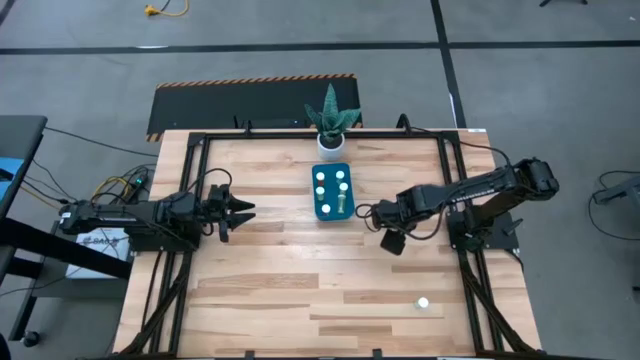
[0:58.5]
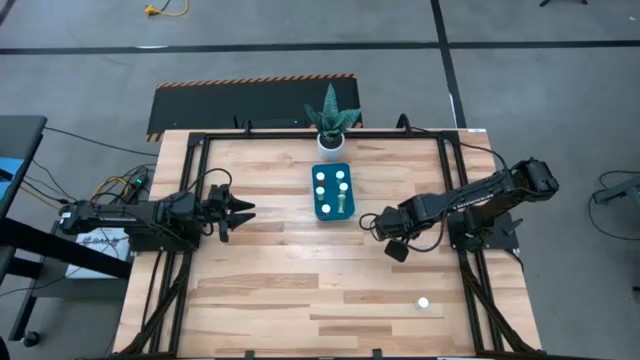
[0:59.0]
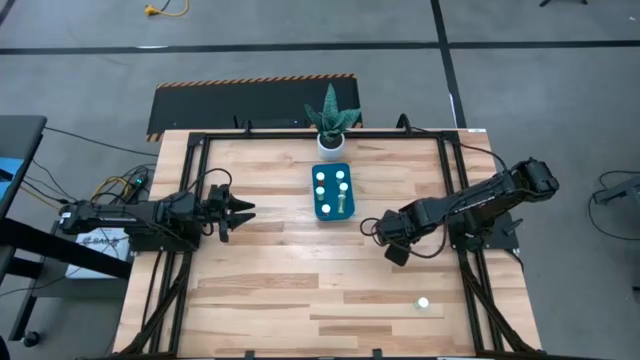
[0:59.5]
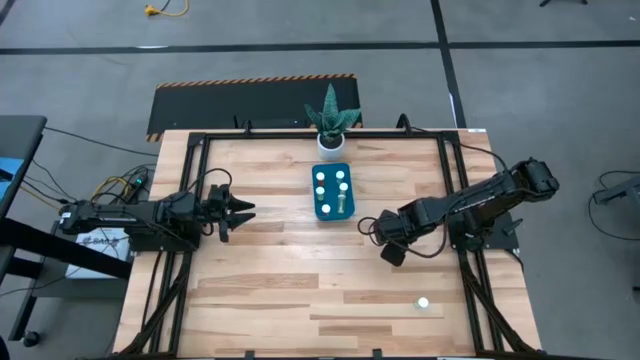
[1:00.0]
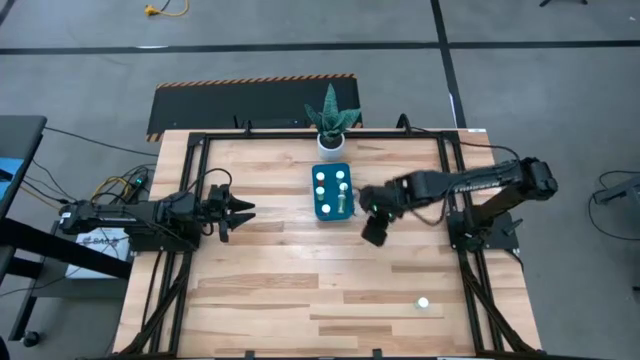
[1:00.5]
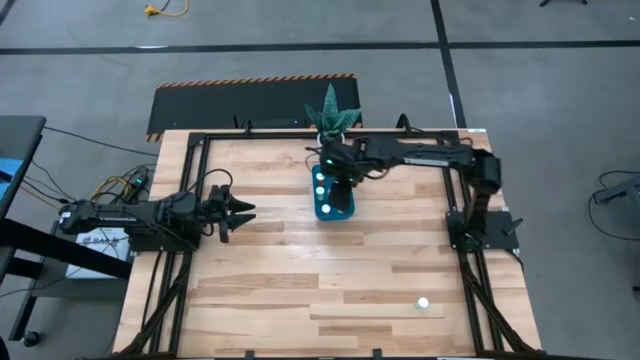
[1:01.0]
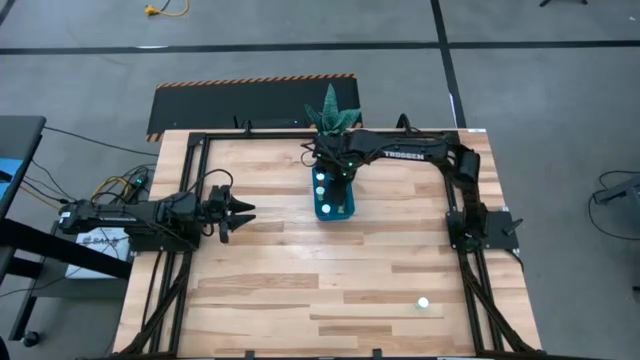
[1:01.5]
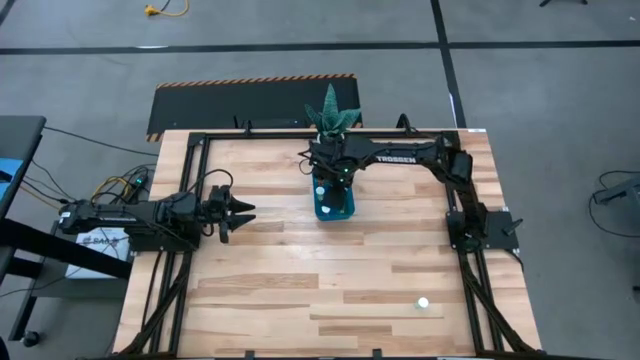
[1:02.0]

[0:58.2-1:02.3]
Task: Pick and place pill bottles into a basket
Put the yellow pill bottle into the blue container

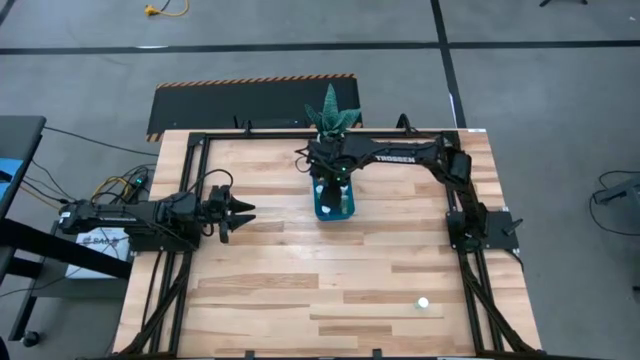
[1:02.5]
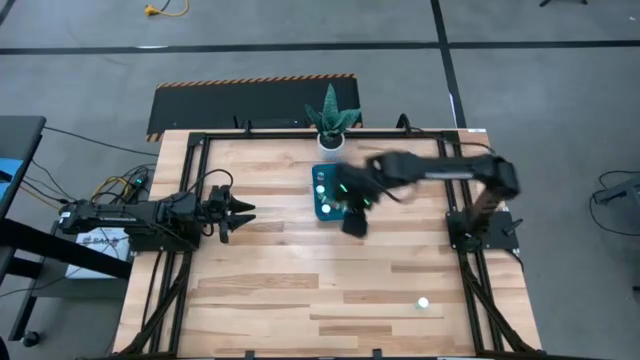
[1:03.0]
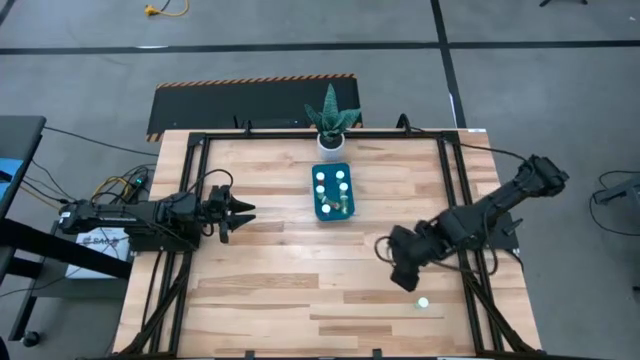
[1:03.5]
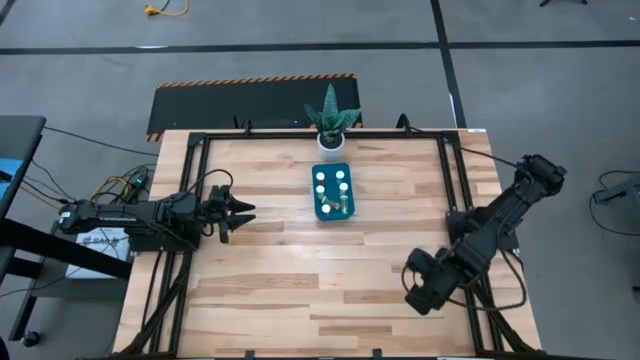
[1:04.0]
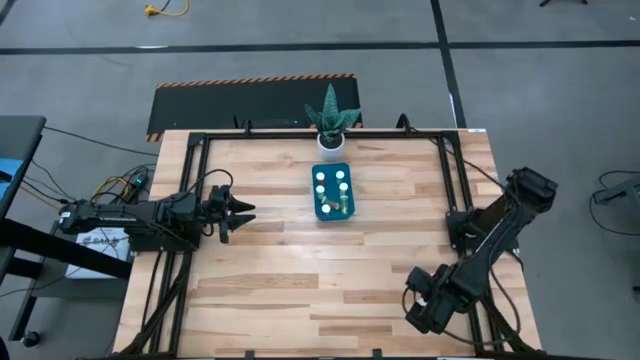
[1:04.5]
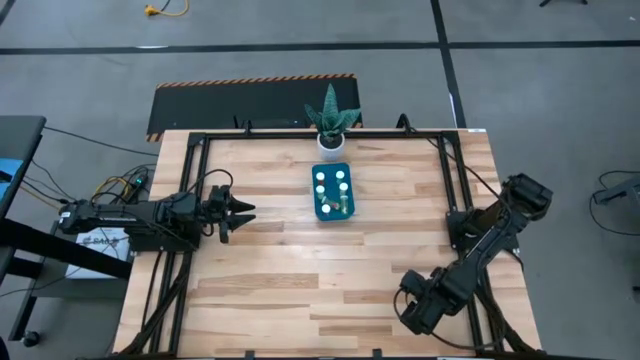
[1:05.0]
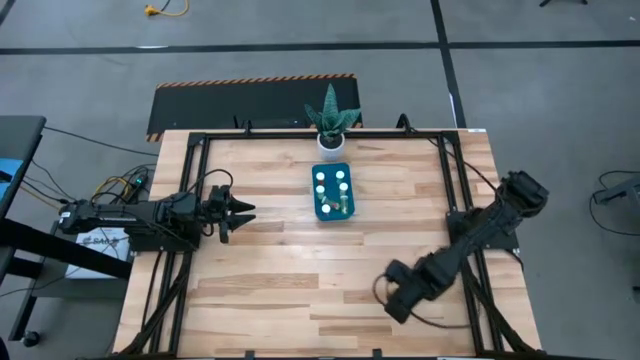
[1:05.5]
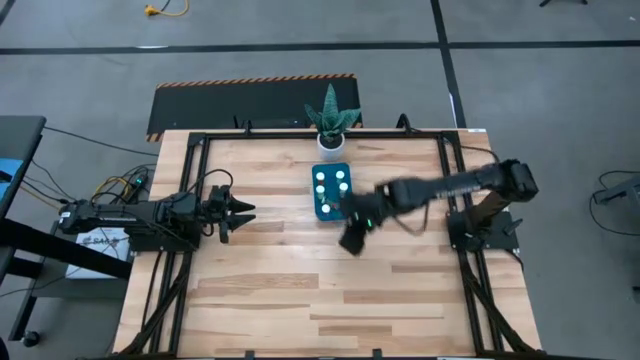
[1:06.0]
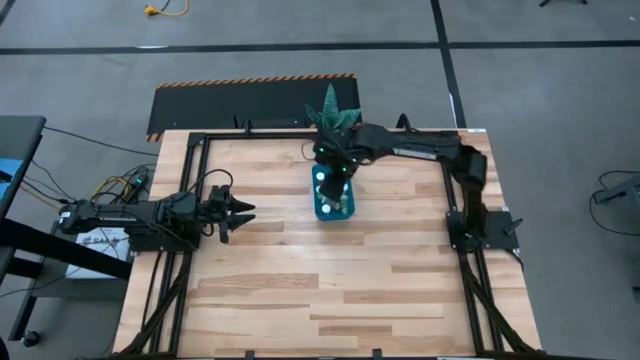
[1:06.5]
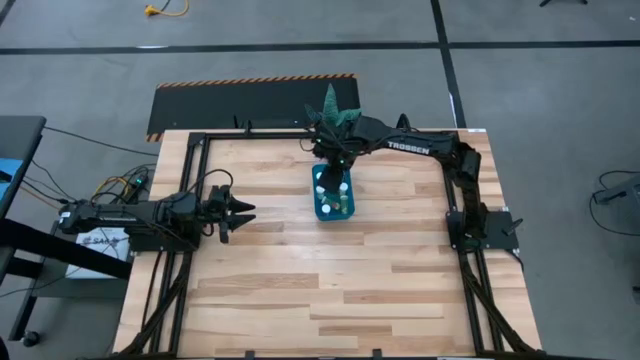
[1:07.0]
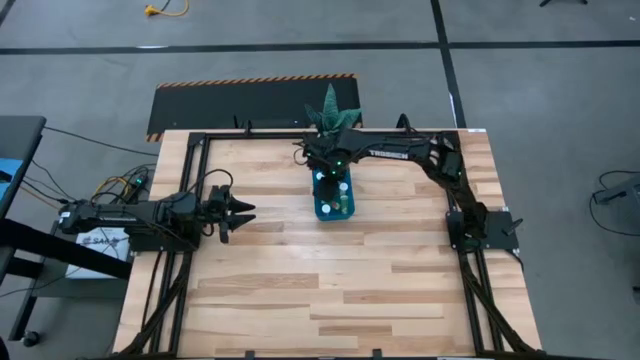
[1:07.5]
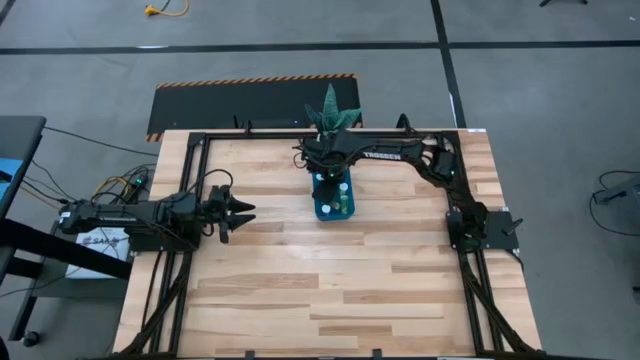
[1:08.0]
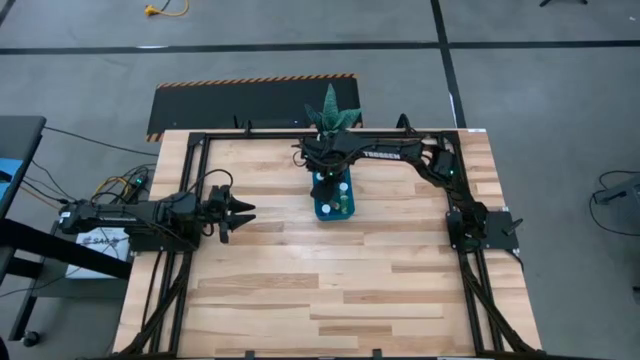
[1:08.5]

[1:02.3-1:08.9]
Put the blue pill bottle into the blue container

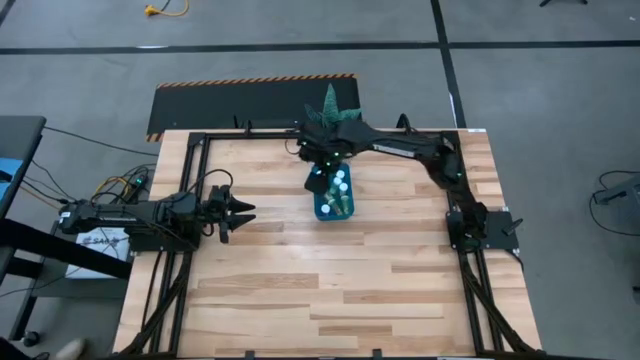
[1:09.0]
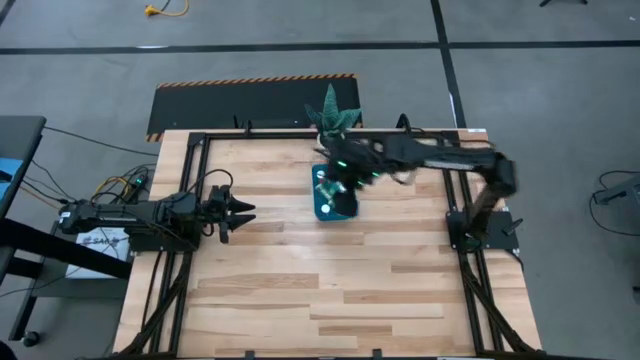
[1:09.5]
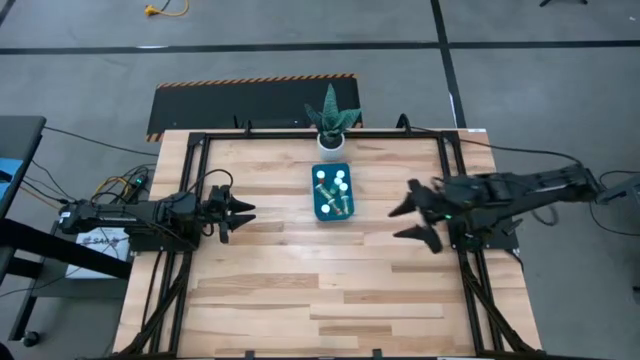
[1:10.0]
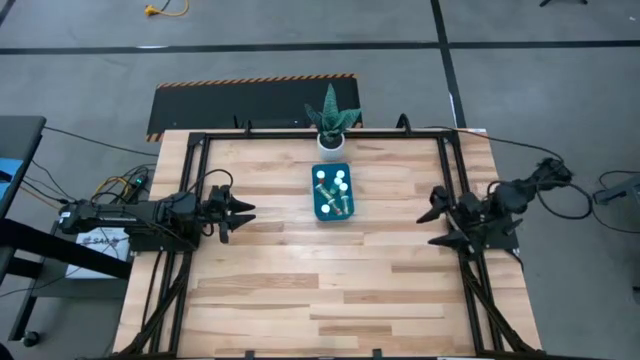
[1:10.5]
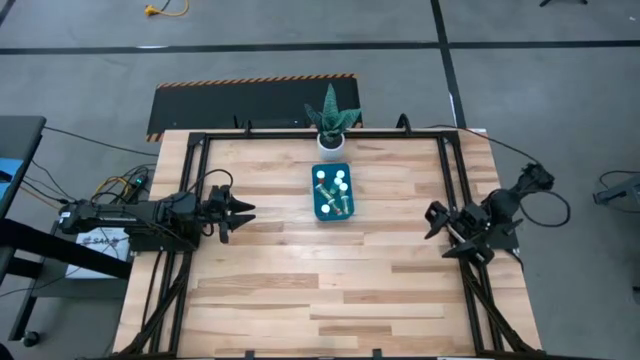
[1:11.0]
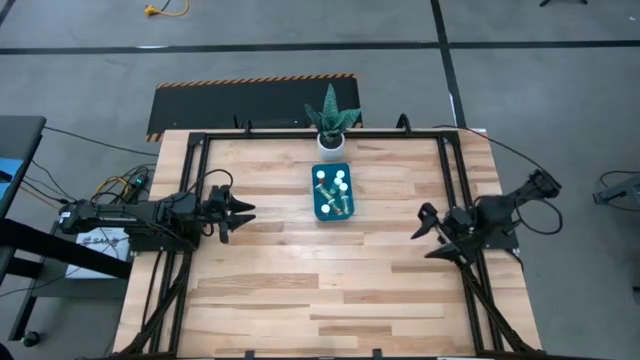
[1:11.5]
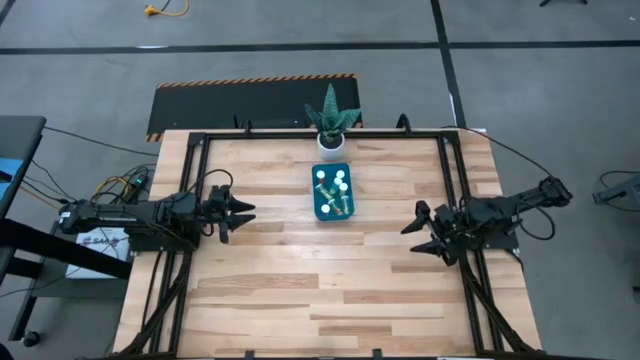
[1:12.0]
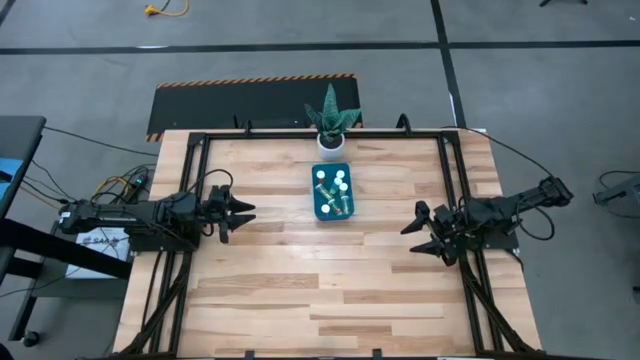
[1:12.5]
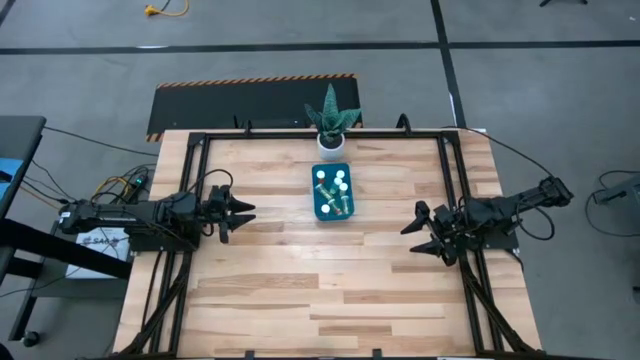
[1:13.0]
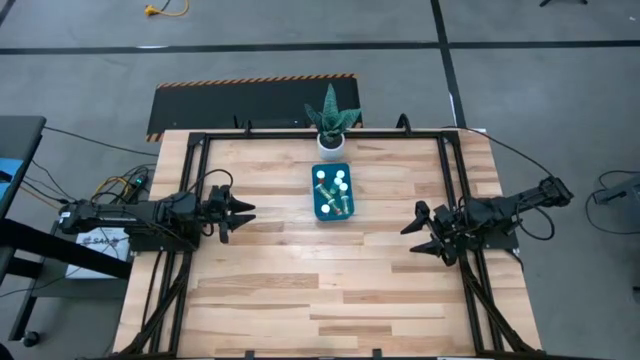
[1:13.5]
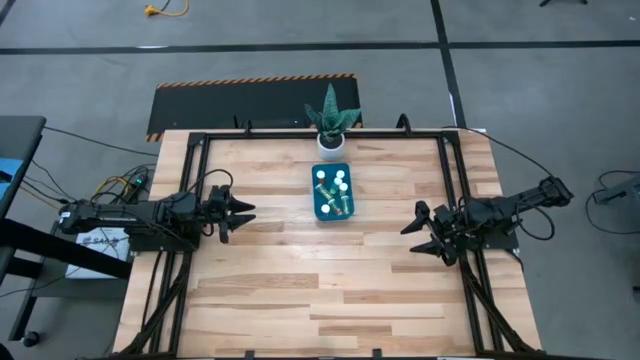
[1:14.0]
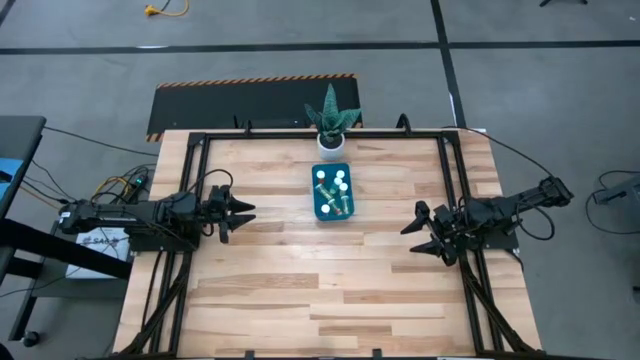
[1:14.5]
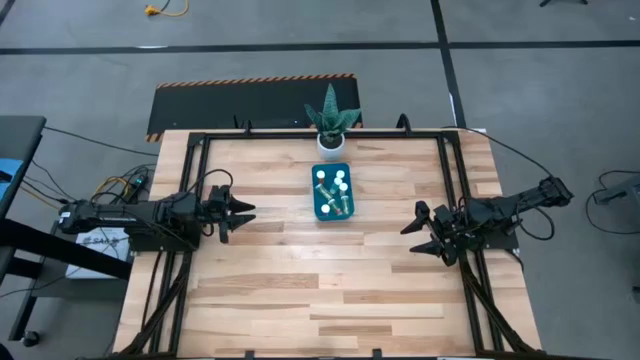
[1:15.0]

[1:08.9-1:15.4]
Return to Home Position

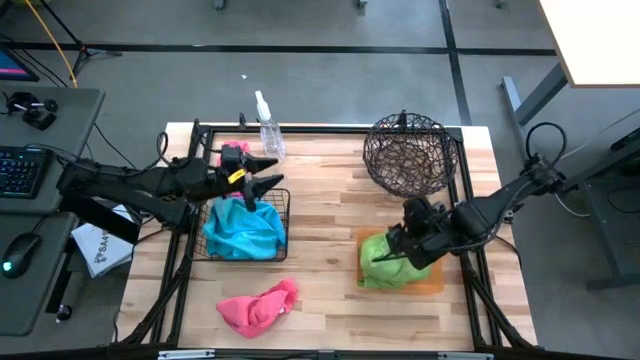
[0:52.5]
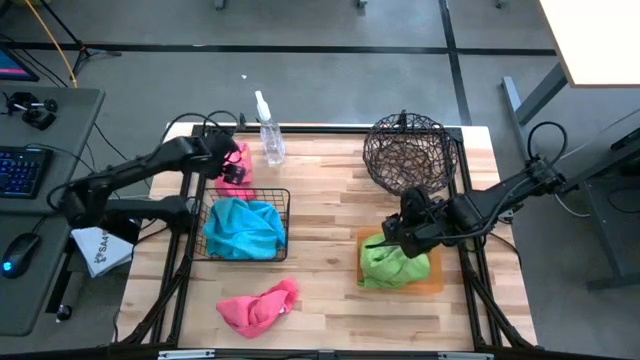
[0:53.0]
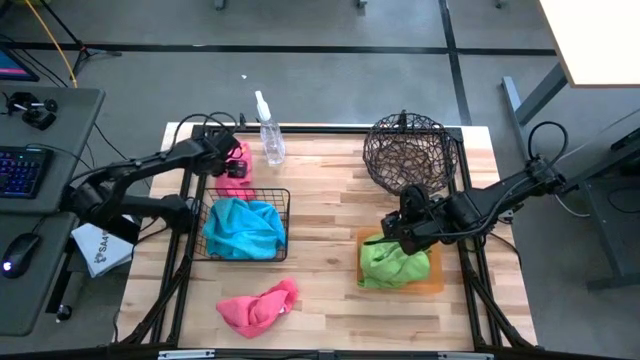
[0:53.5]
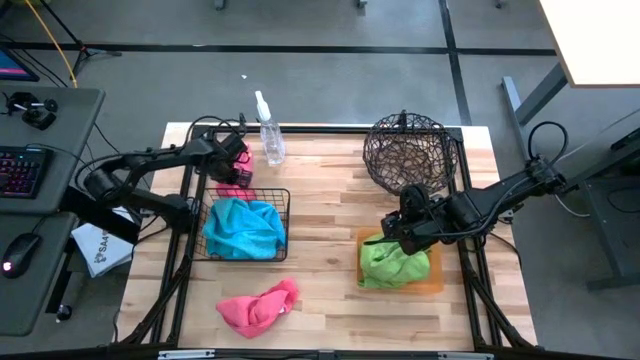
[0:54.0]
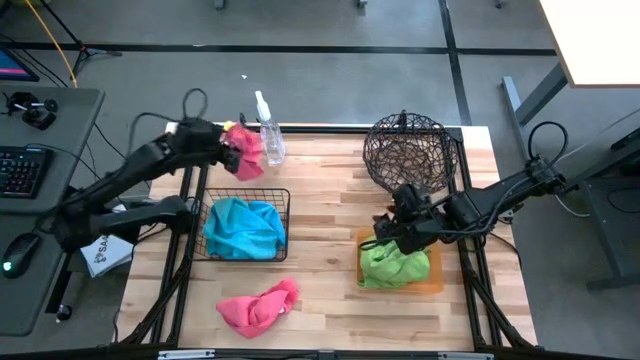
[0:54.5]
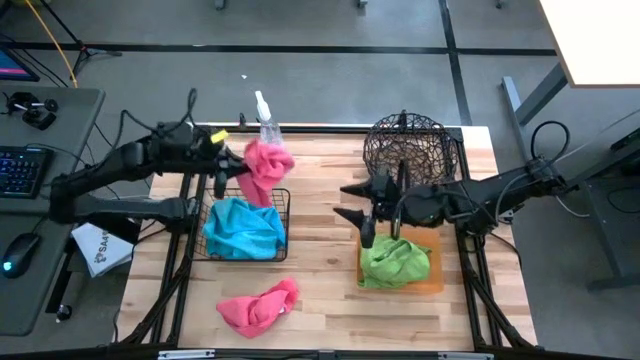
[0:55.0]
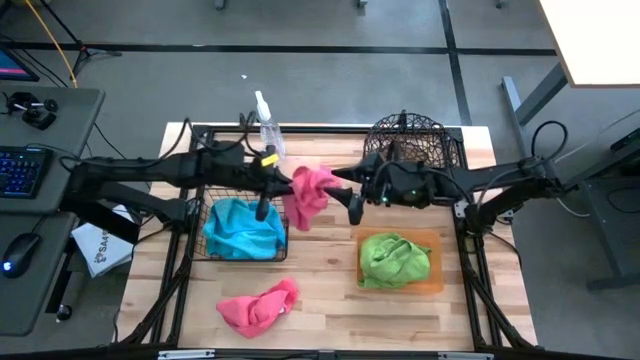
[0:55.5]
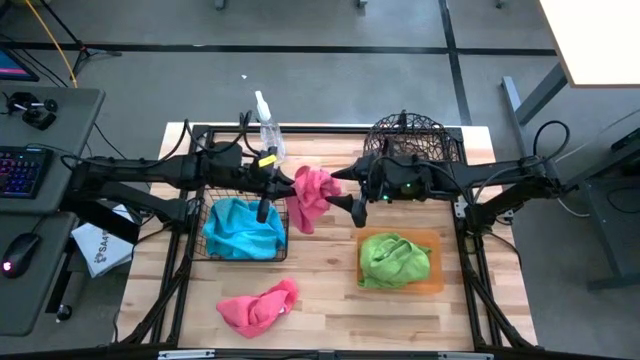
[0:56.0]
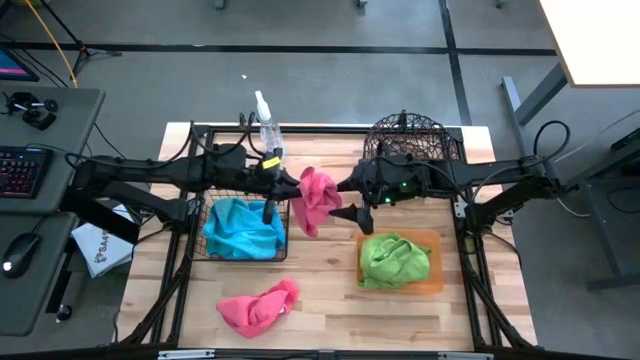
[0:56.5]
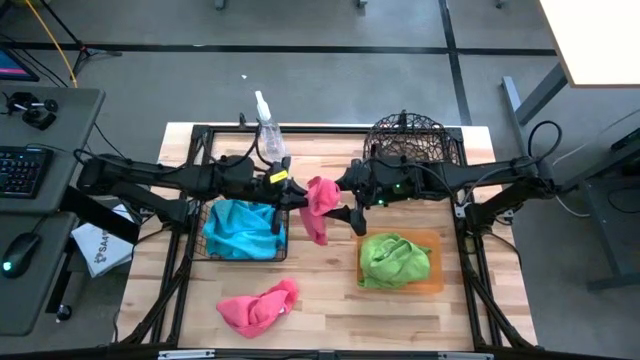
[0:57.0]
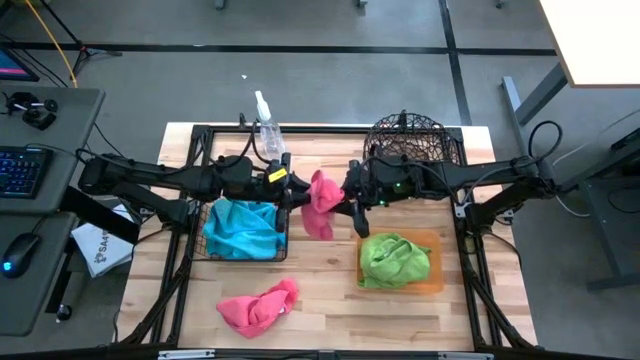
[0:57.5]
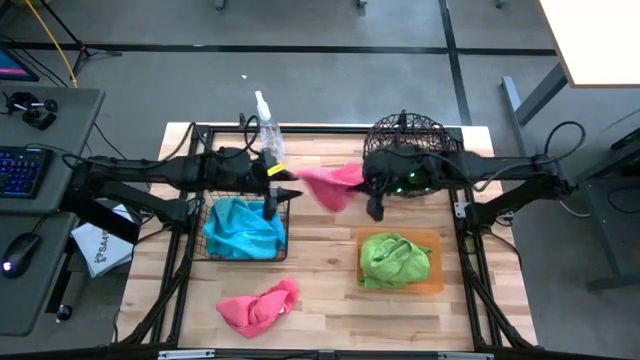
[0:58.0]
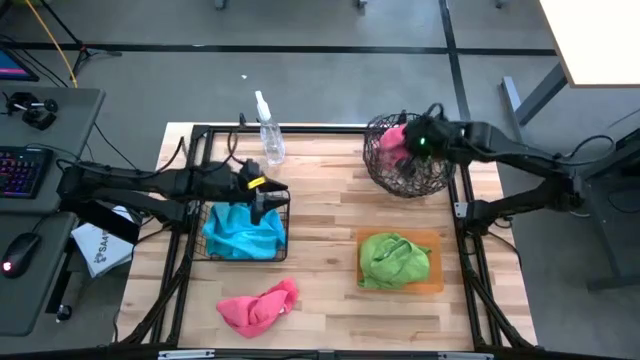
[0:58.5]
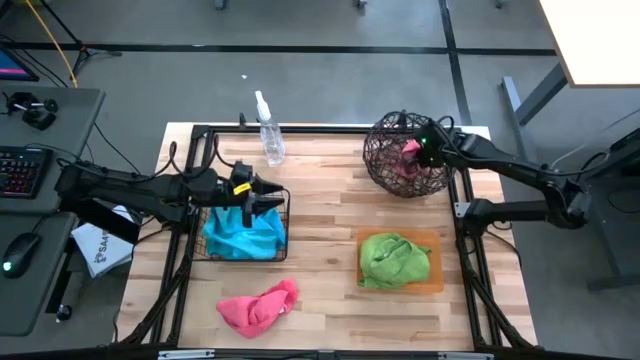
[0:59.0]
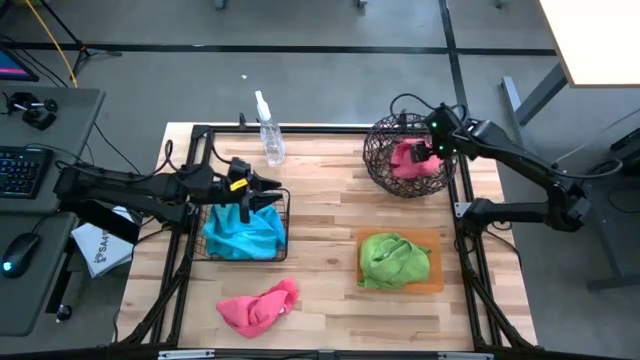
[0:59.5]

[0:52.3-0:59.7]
Task: Sort microfiber towel by color & place in baskets
Put the top pink microfiber towel into the right wire basket
